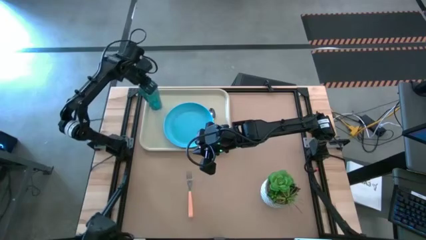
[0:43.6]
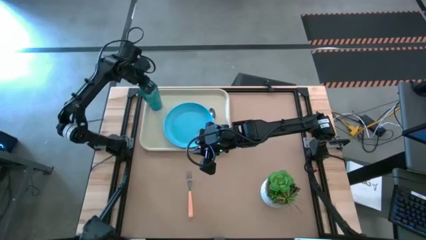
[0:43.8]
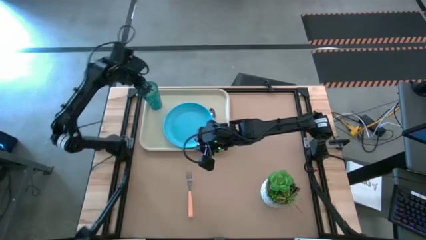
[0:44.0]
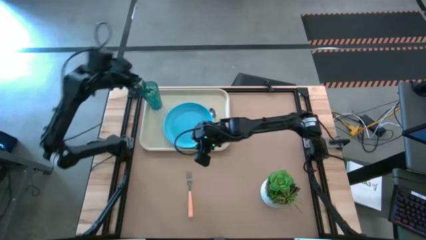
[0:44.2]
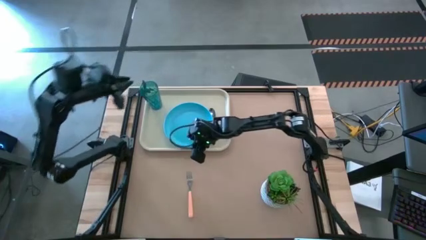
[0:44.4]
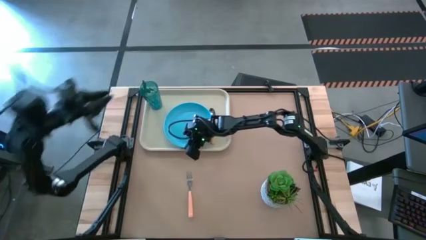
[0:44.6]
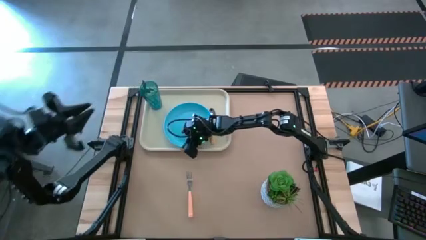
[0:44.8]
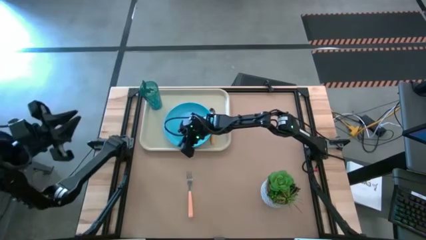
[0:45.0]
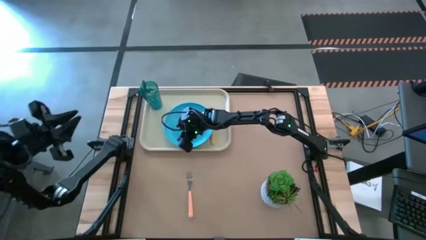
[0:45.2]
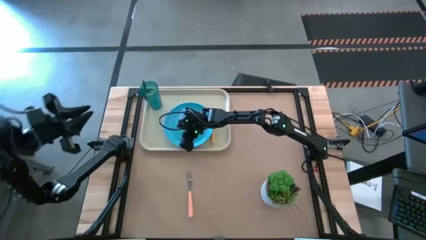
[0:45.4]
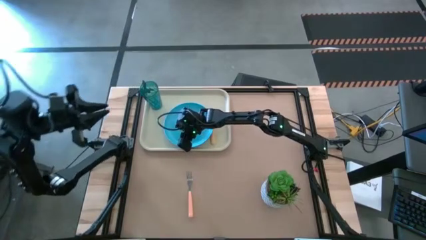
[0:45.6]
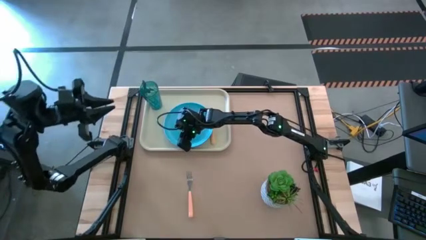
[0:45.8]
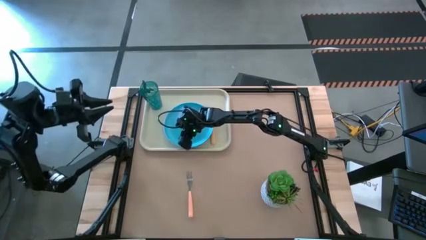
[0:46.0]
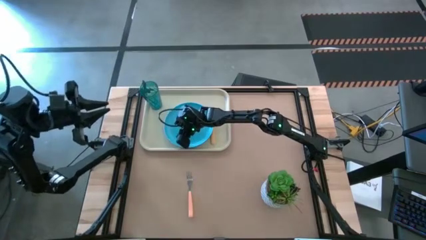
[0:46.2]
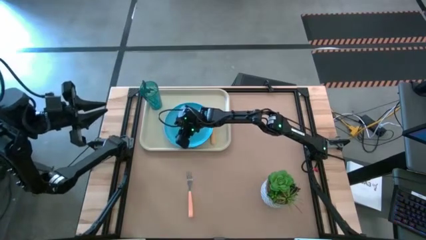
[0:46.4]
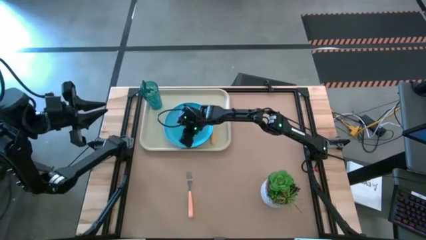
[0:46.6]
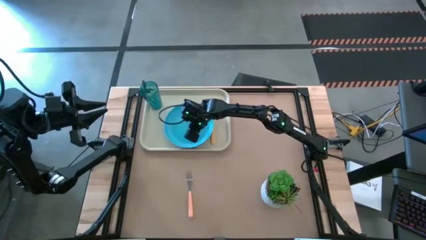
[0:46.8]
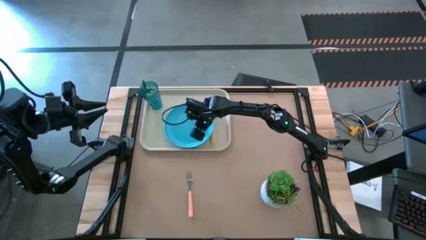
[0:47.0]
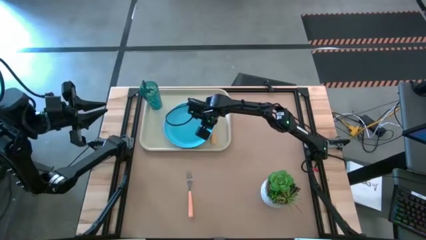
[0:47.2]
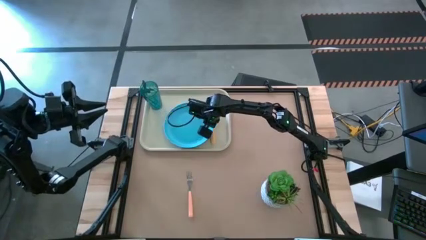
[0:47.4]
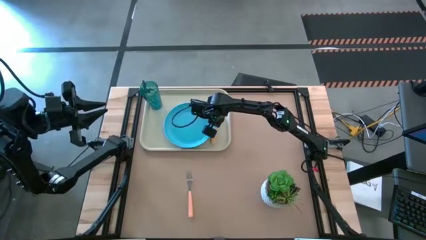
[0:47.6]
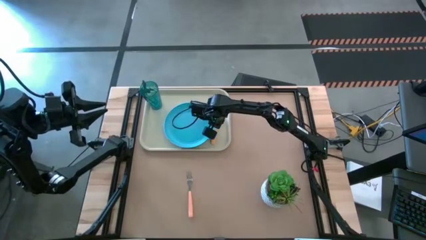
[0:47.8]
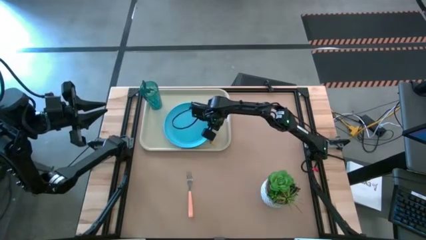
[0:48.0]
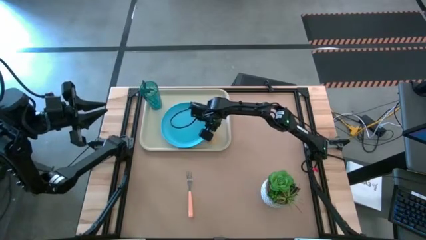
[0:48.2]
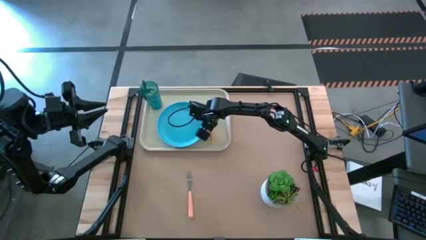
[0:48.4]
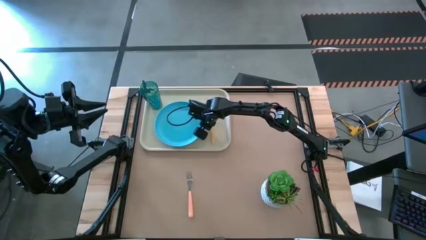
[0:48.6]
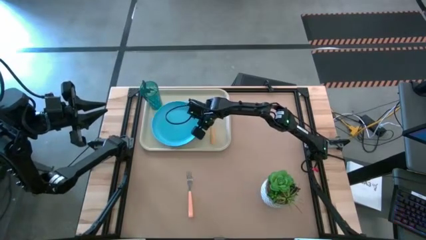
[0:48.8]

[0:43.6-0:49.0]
Task: Pick and place plate/cup/fork/spoon on tray
Adjust the light blue plate on the white serving tray

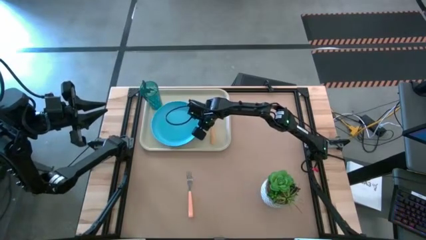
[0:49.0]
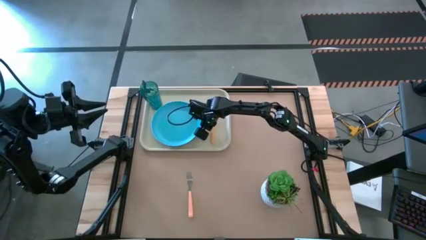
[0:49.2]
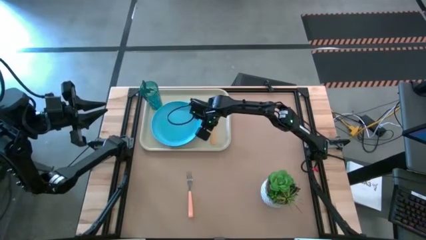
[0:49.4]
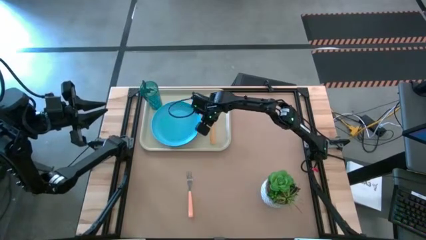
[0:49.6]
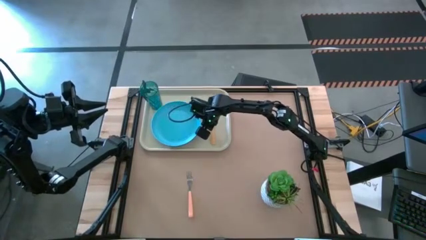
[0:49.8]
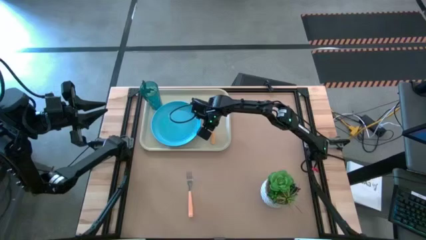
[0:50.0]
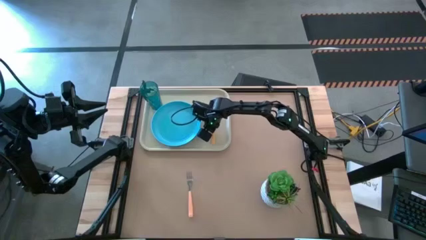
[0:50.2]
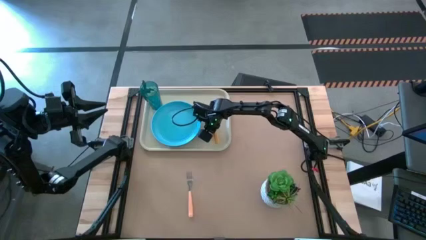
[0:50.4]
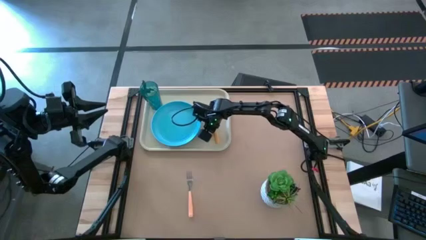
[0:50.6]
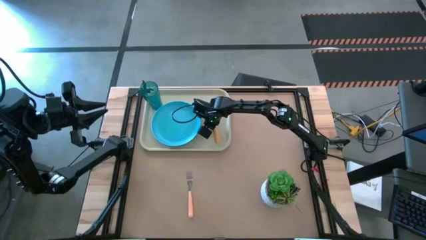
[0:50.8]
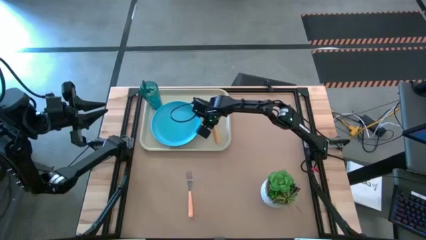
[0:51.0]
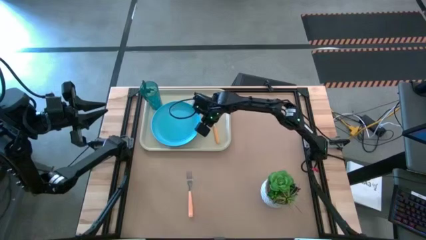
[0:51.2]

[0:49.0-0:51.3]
Adjust the orange spoon on the white serving tray

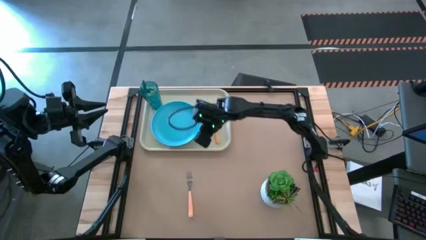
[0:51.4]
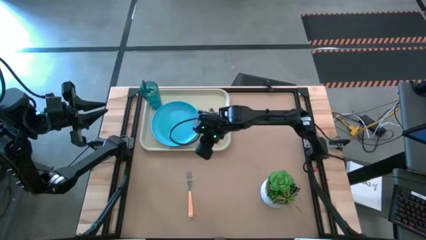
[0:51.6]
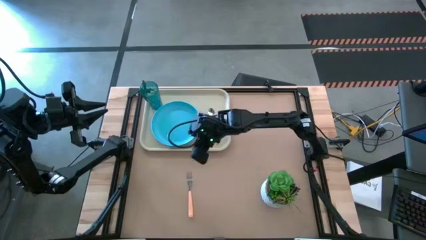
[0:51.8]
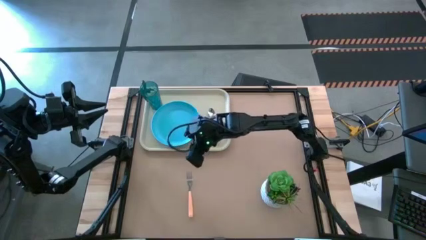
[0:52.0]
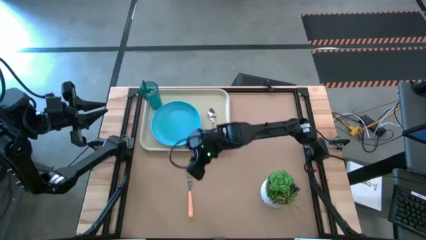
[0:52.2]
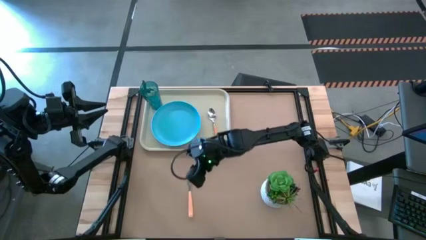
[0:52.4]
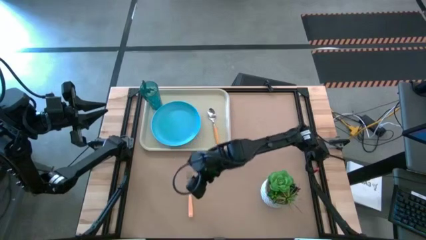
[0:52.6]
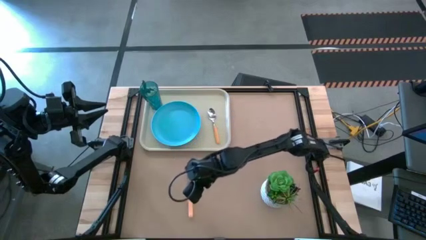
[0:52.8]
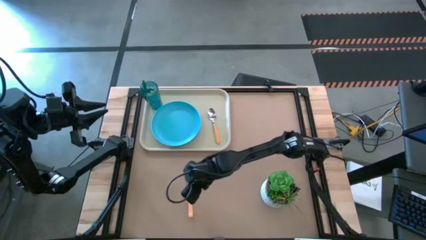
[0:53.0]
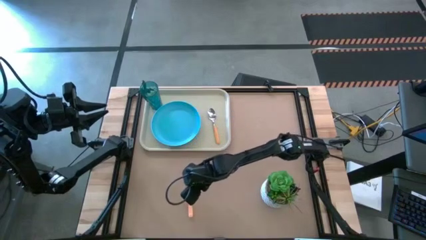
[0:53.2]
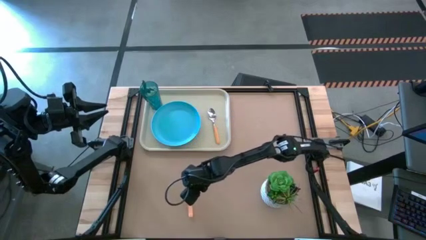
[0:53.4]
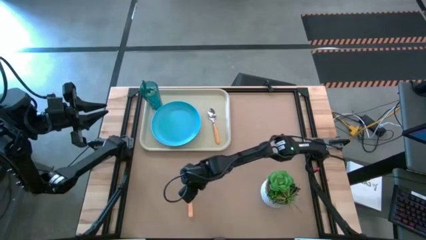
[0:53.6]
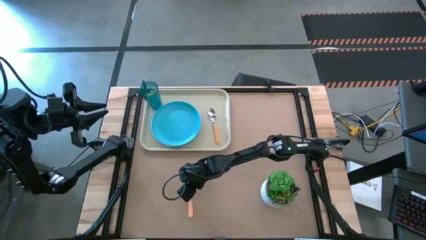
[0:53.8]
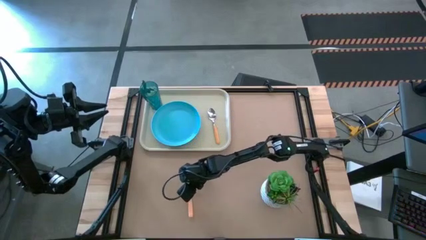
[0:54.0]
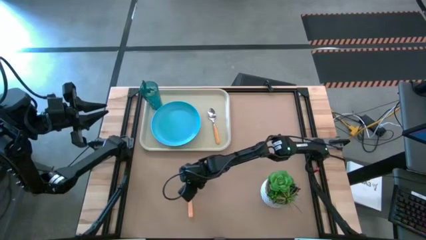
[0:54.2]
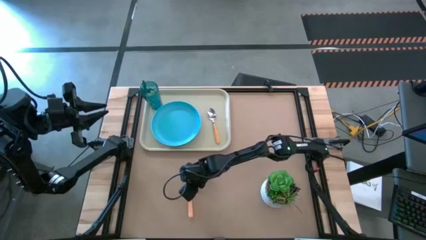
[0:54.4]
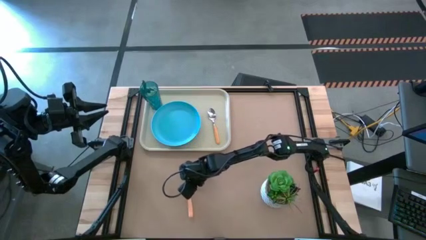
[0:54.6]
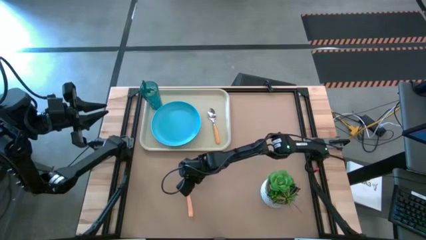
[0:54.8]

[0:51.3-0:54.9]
Put the fork on the white serving tray to the right of the light blue plate

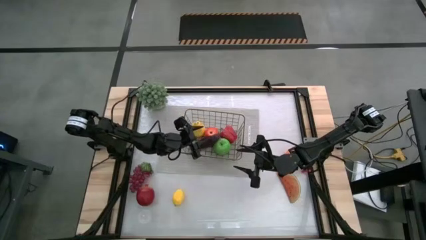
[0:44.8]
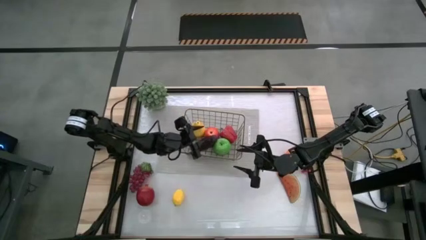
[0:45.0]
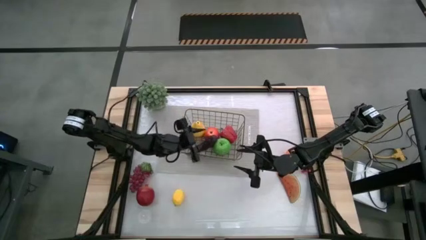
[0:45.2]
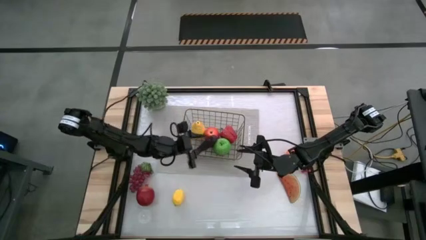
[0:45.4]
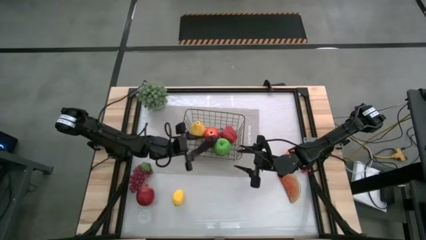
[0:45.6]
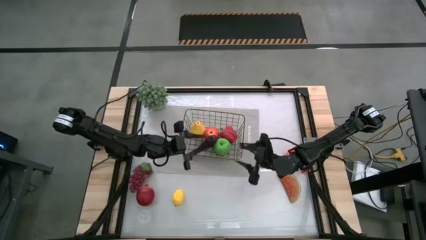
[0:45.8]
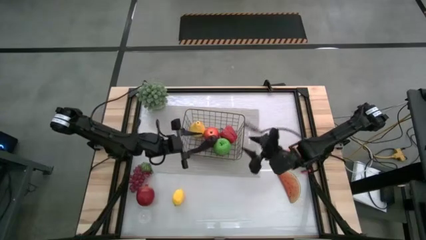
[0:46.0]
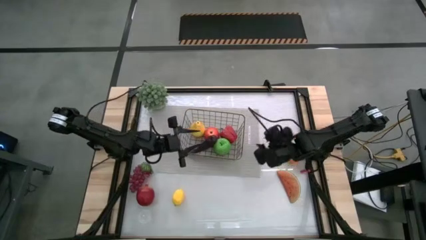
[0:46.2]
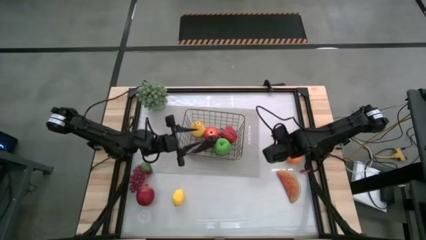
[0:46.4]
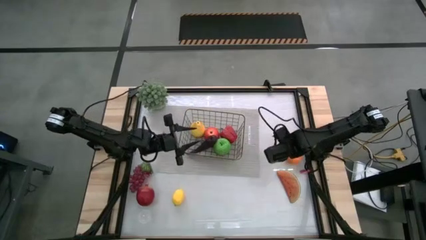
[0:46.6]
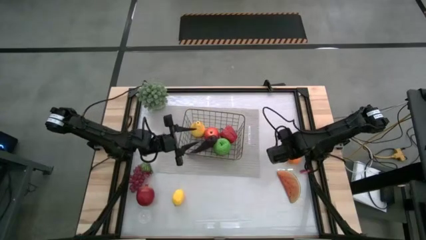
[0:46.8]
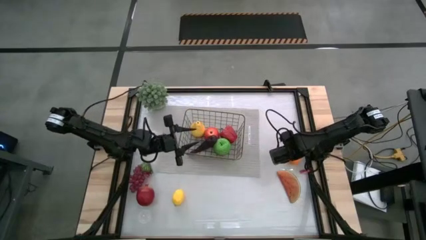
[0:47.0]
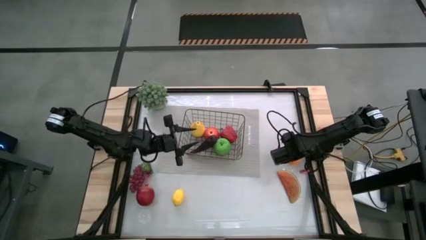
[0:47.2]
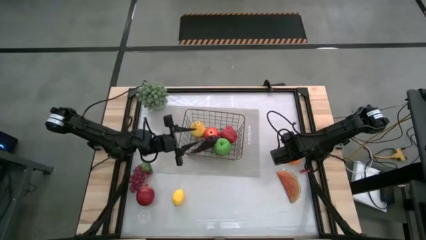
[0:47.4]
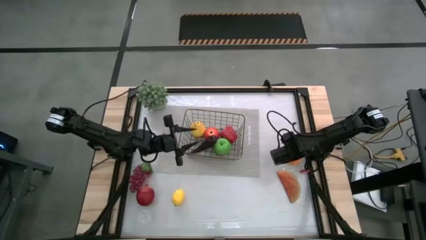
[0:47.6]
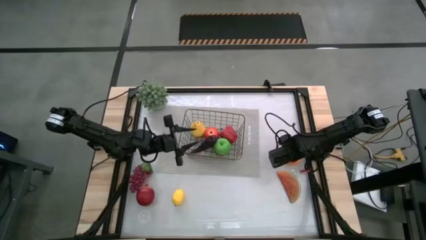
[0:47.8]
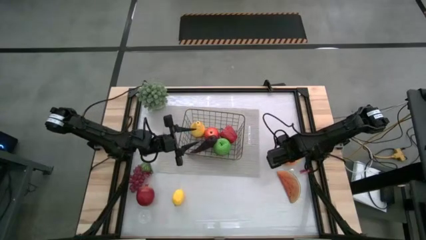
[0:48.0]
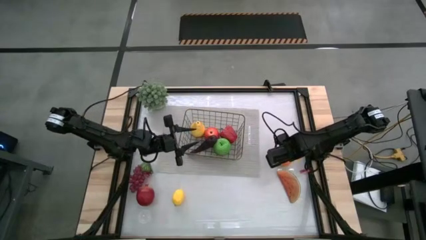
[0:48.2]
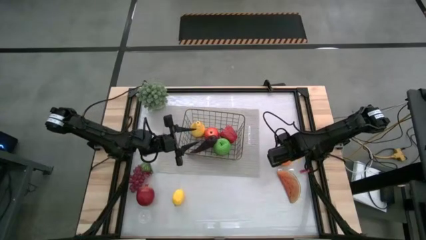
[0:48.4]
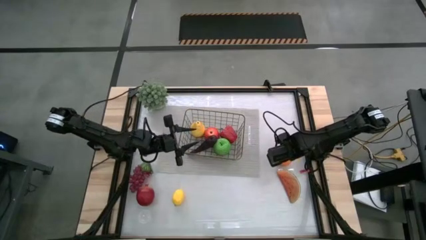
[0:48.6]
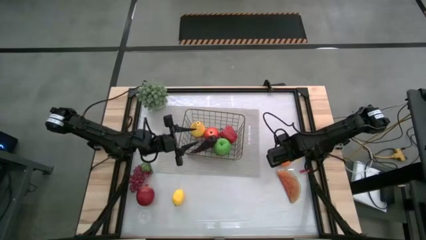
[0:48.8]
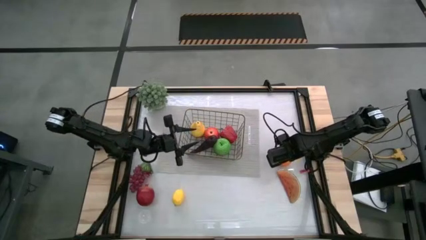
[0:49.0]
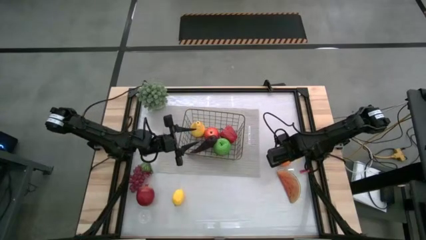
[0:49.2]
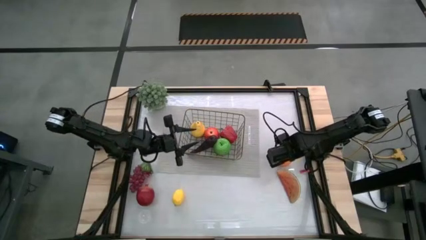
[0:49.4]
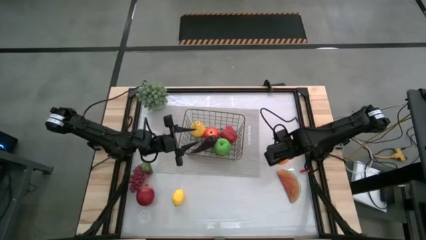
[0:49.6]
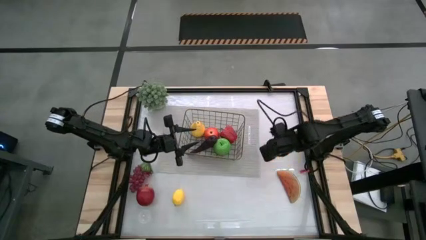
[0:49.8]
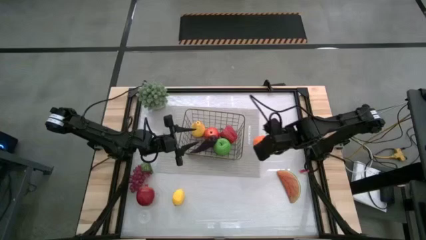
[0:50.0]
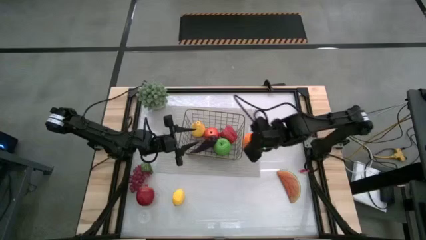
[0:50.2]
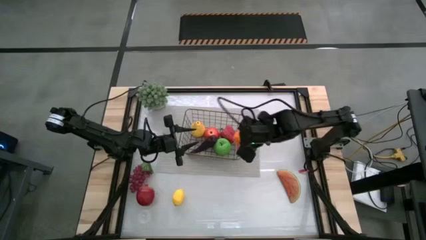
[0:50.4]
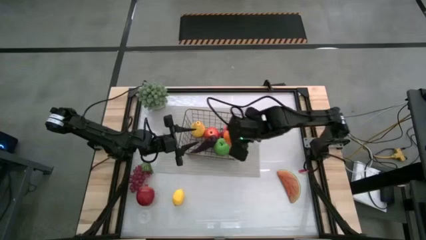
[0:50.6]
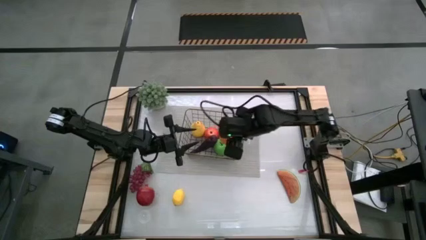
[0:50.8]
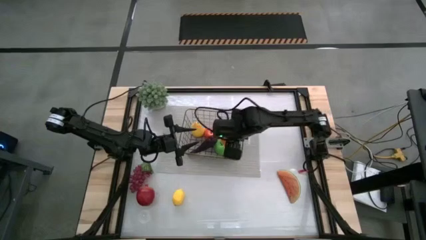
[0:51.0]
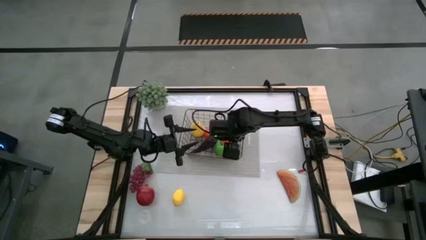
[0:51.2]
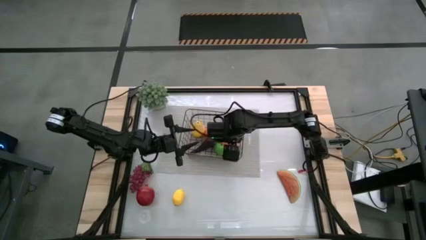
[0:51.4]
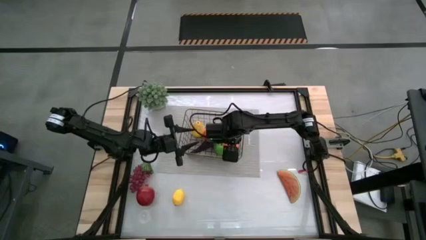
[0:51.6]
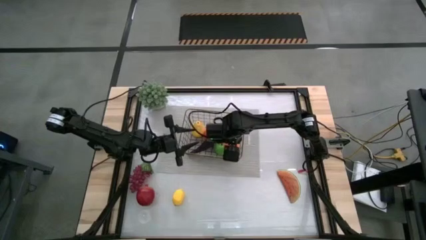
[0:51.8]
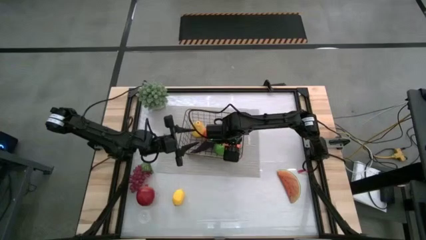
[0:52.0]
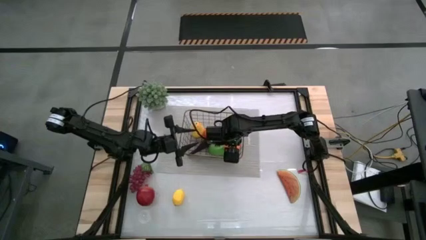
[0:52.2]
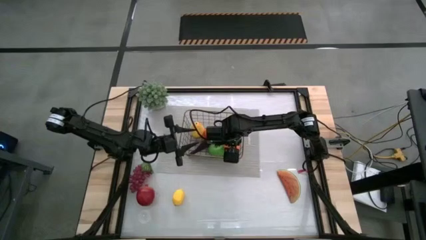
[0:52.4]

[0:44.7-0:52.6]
Task: Build produce basket
Put the orange into the wire basket
